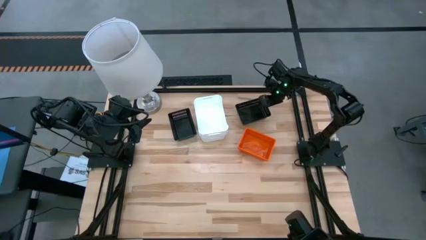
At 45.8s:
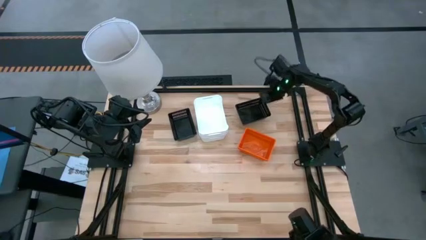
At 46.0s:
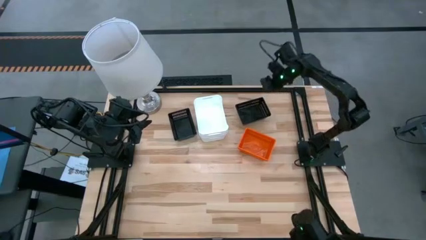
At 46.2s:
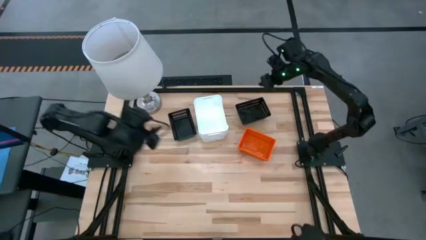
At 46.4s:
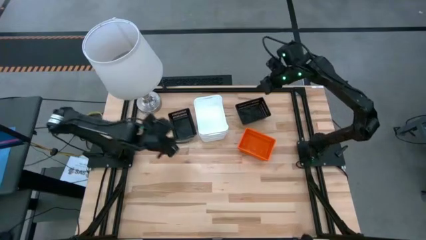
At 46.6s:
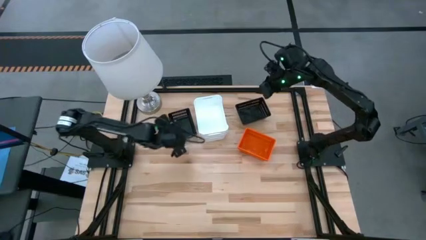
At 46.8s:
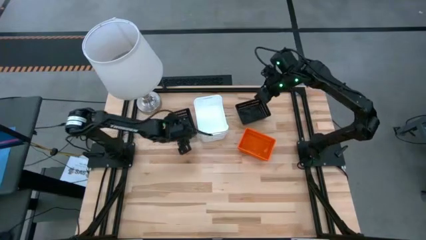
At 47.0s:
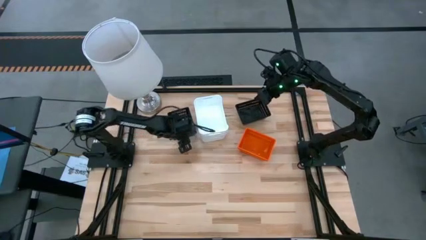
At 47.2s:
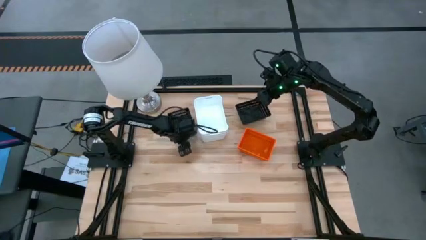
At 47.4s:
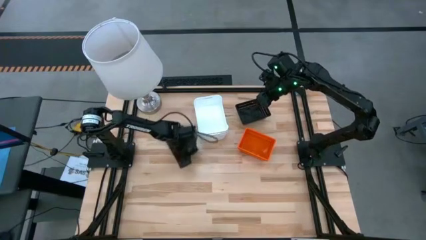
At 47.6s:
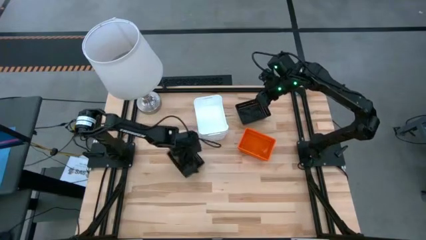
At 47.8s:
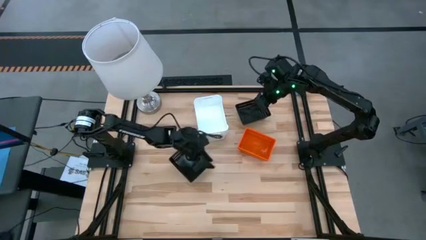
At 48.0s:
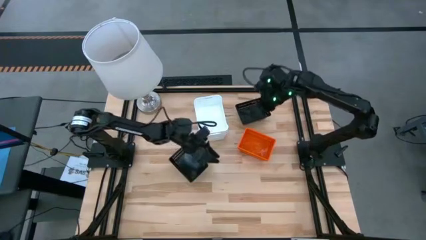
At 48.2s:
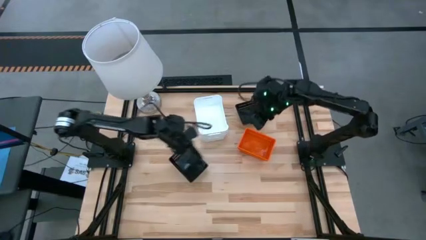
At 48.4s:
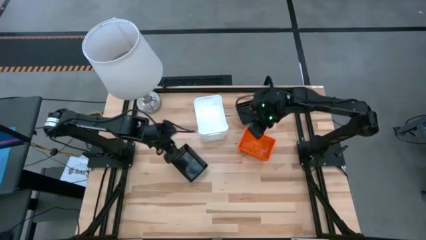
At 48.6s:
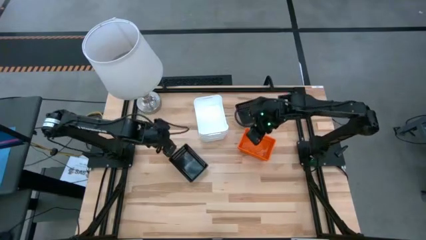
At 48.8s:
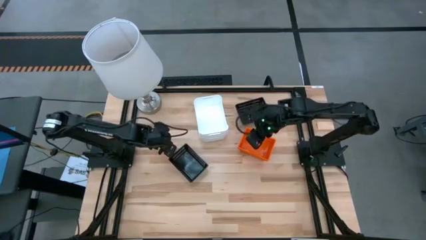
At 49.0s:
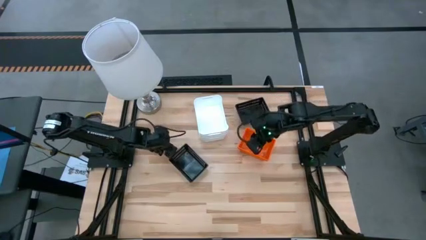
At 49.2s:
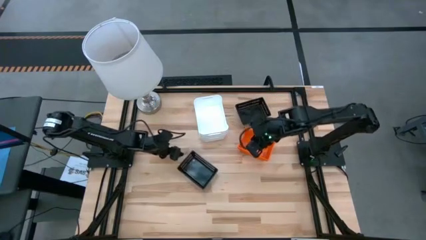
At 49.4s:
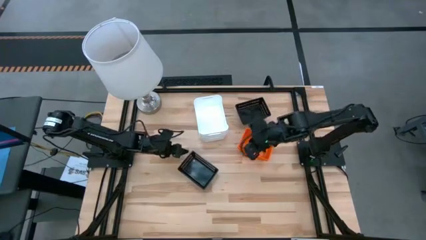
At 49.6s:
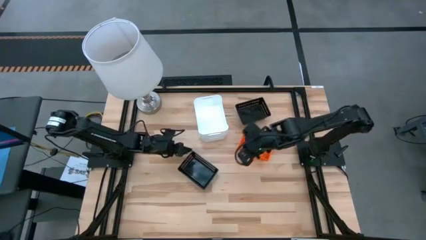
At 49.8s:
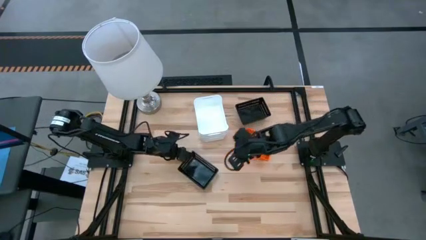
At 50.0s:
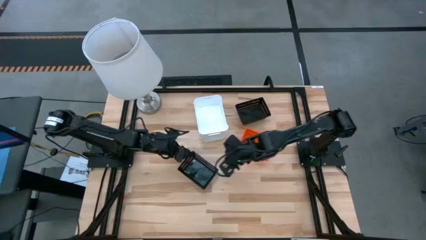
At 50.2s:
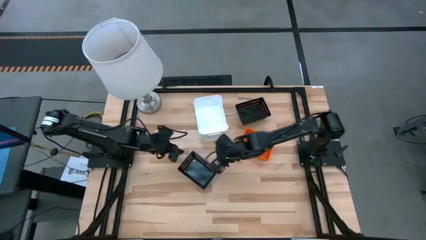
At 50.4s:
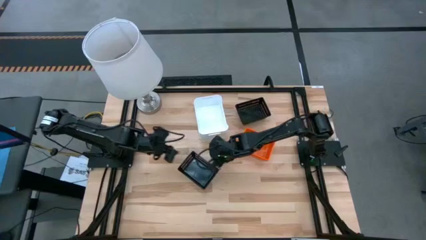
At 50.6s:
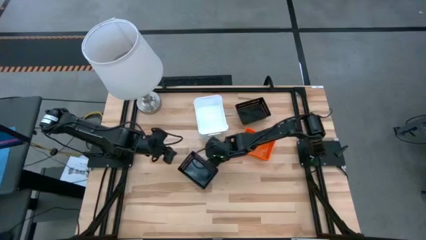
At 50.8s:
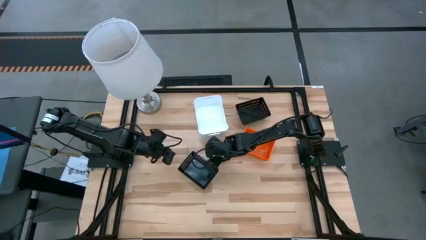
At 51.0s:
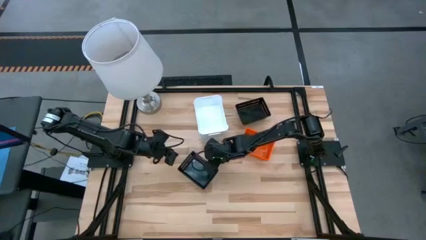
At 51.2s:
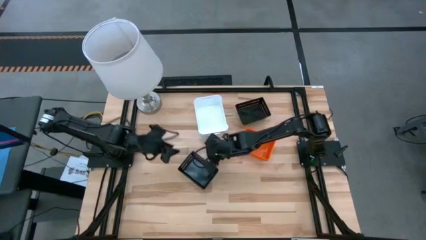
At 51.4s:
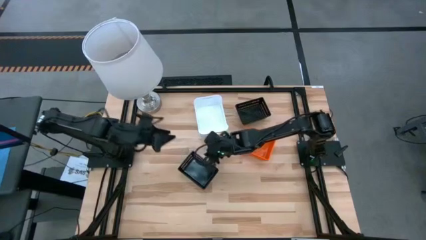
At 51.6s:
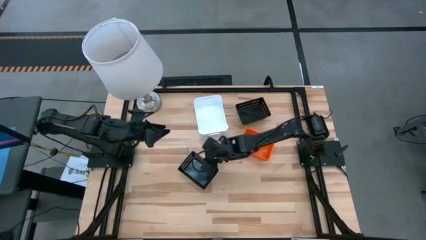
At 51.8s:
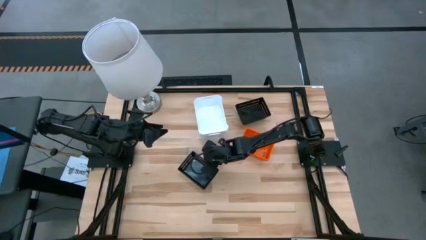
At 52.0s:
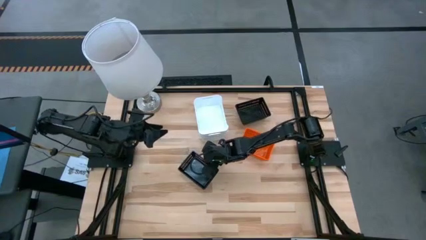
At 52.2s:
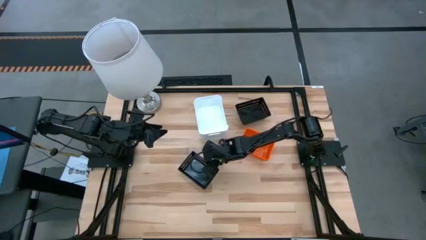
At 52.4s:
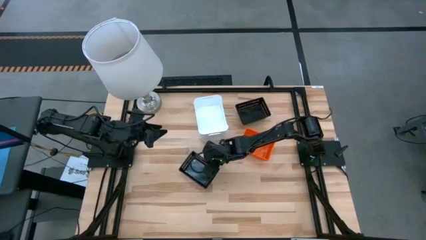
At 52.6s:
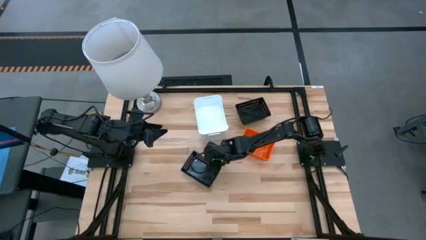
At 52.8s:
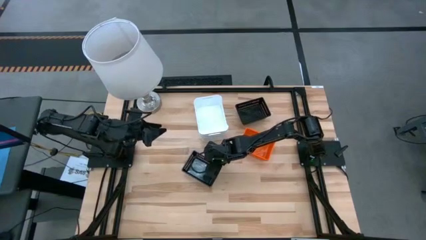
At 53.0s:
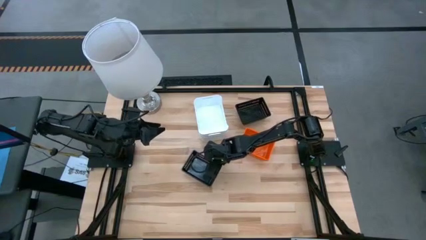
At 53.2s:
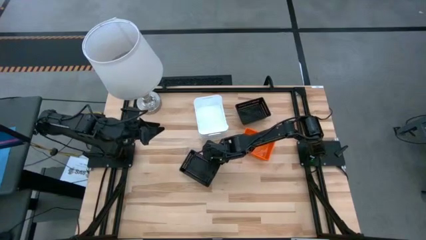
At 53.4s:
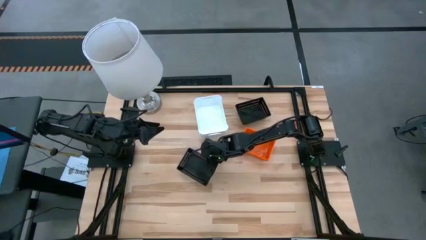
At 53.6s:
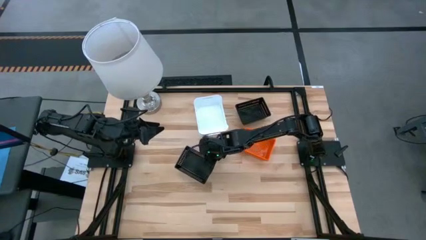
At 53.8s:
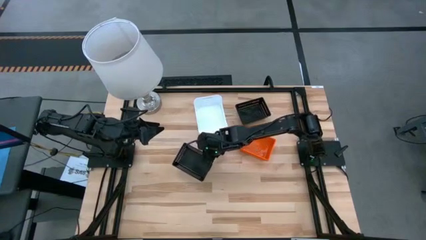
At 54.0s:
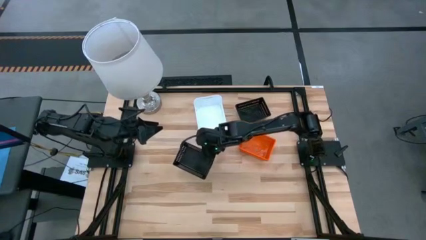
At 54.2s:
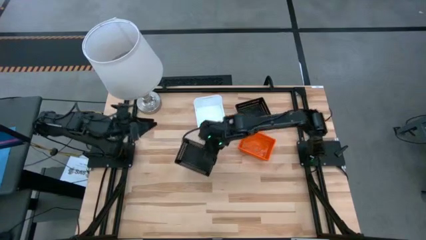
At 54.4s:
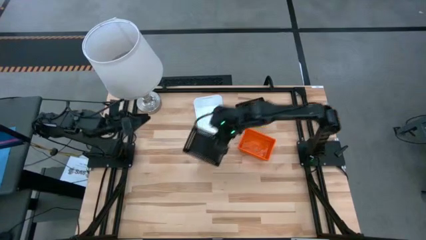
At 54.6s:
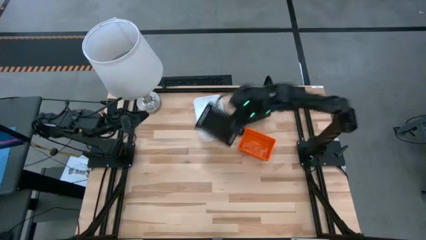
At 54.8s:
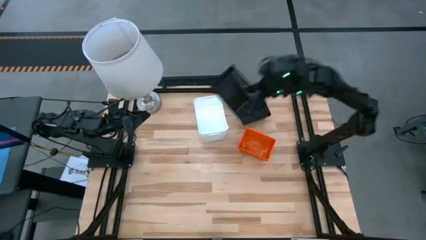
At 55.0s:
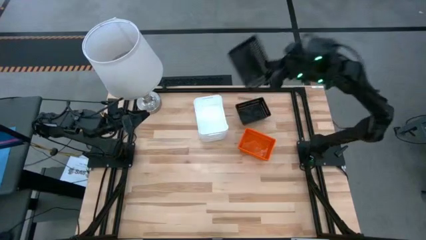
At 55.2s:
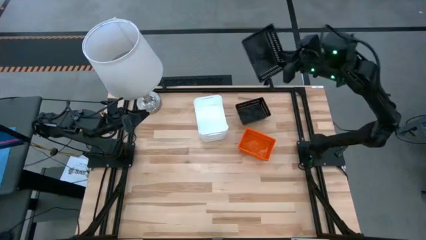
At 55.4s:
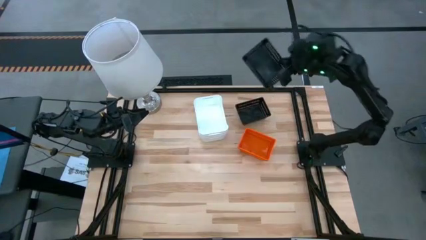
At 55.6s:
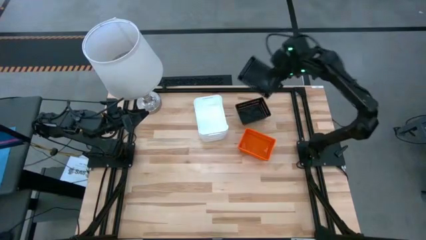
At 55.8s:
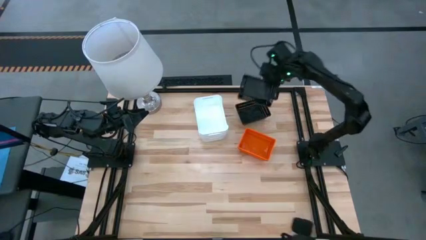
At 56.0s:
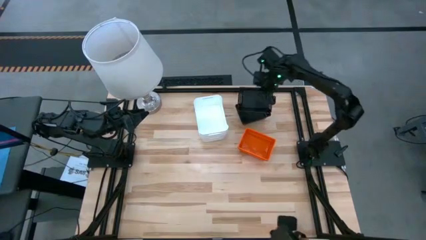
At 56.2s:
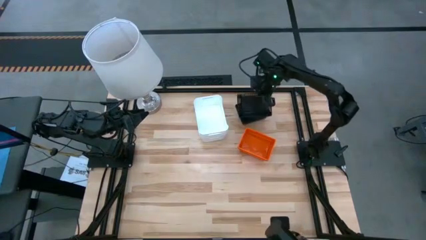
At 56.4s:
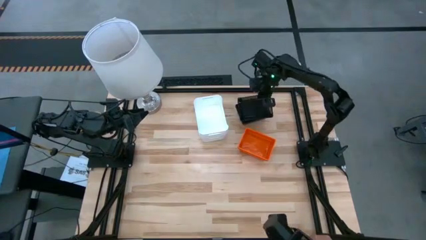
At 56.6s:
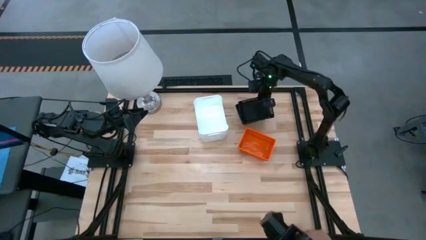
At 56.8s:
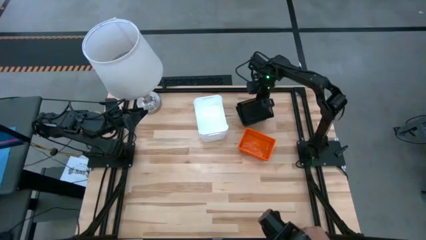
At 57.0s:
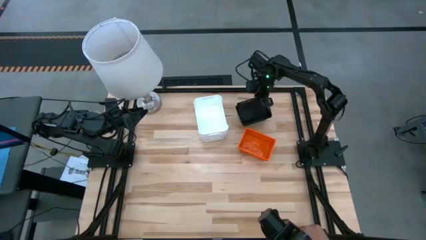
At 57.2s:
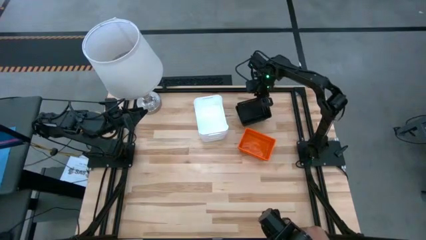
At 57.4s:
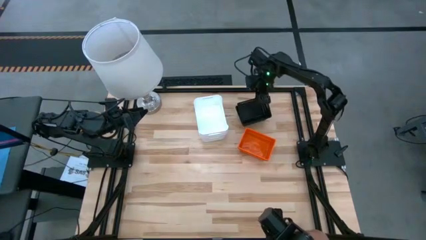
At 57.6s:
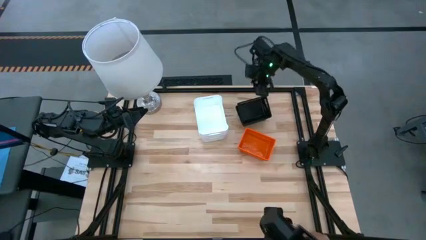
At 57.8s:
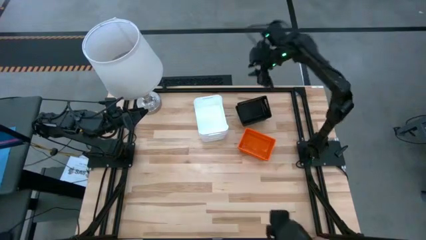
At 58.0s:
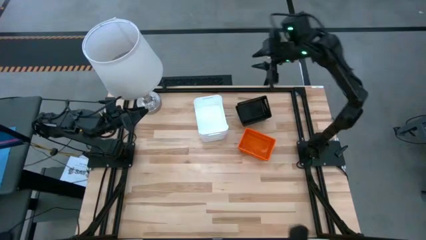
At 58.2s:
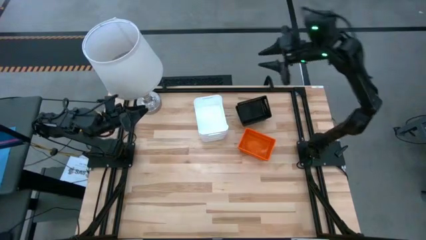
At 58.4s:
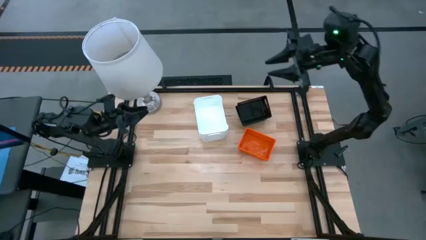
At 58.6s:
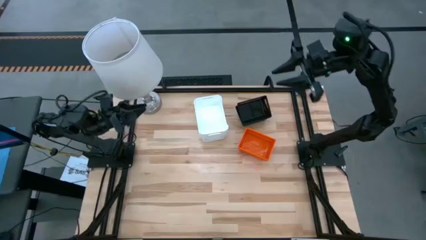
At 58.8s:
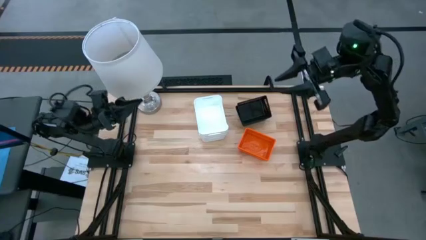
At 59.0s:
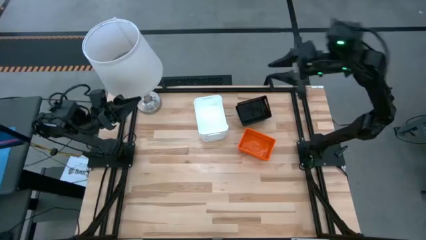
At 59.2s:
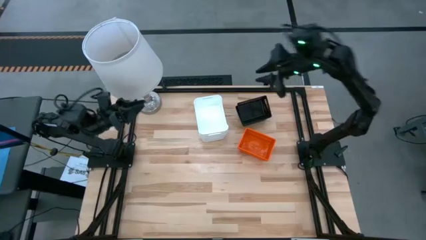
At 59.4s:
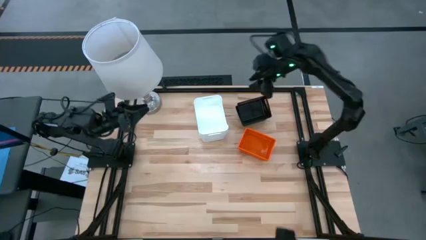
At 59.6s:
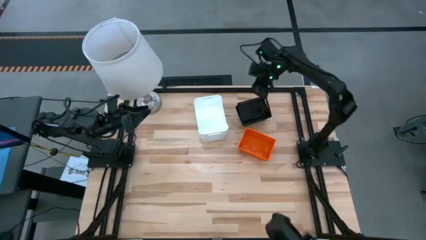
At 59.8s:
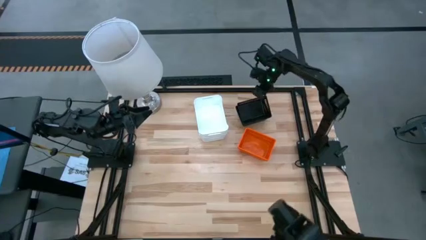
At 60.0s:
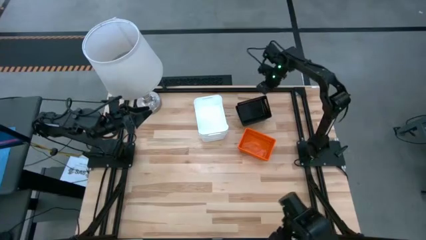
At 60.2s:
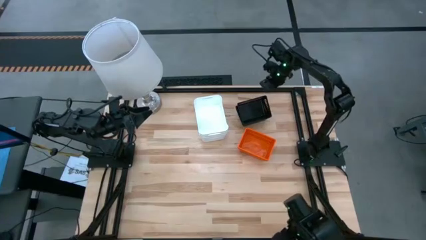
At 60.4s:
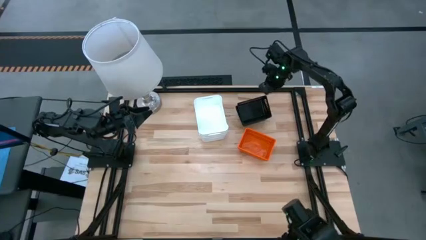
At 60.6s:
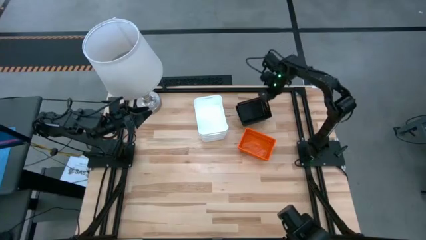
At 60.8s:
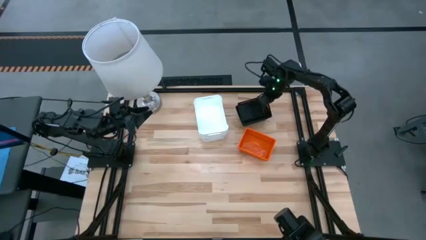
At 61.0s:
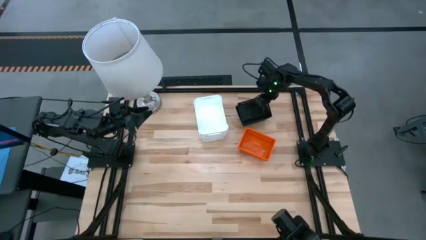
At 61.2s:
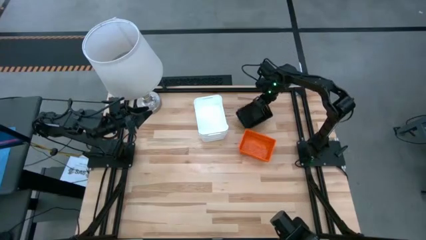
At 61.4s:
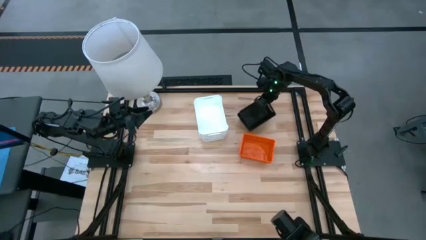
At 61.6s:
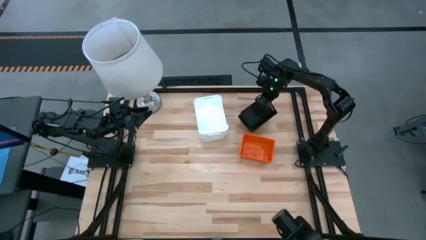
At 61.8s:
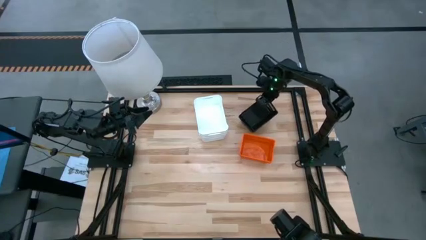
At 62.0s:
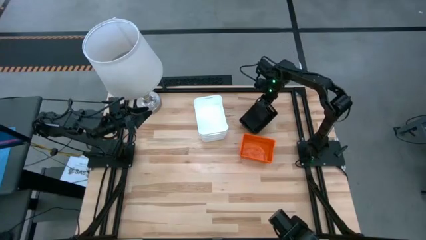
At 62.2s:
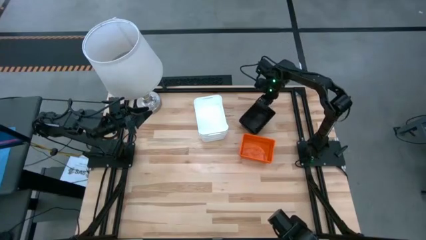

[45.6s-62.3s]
Stack the left black bin on the black bins
